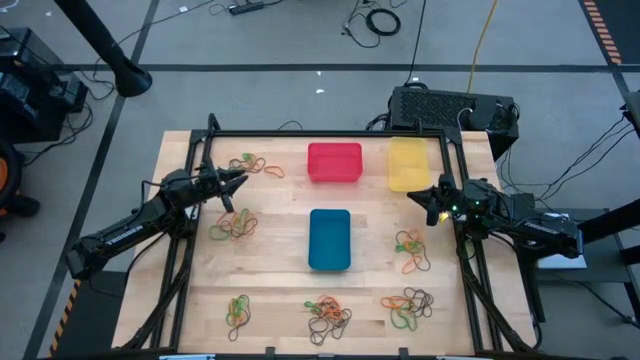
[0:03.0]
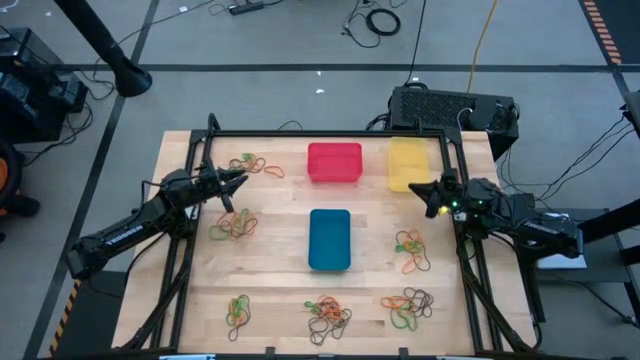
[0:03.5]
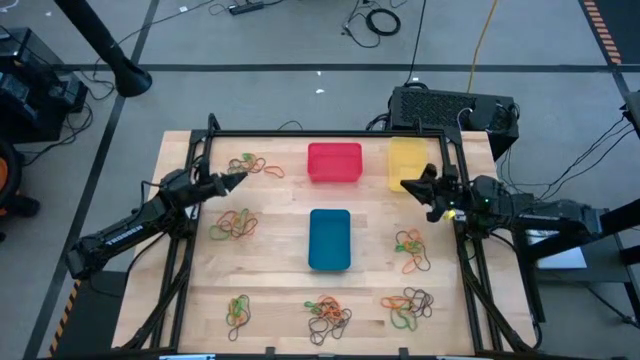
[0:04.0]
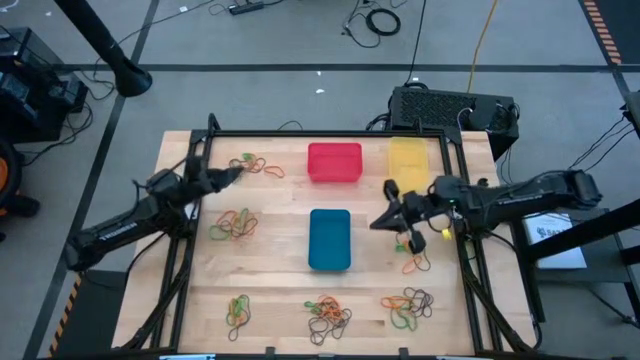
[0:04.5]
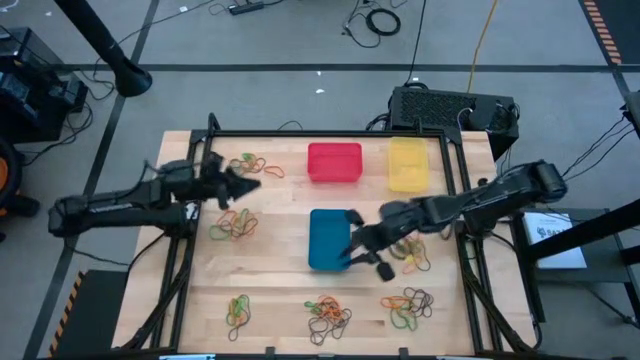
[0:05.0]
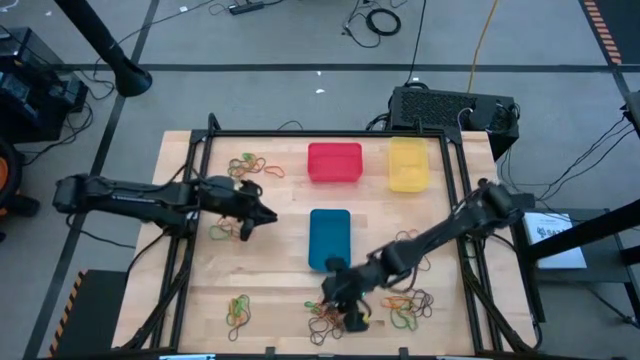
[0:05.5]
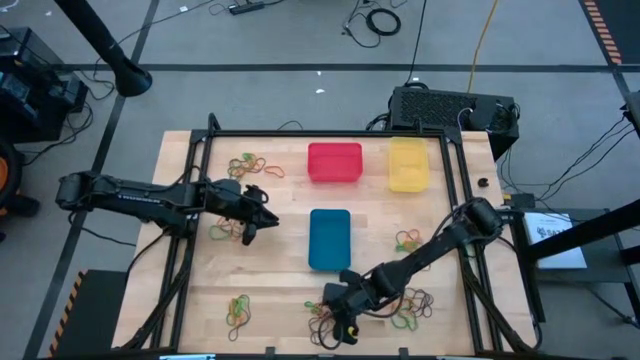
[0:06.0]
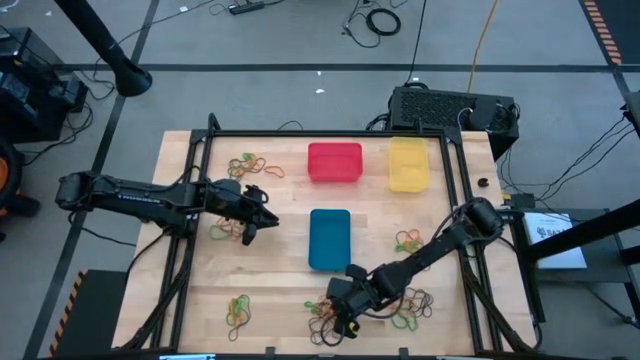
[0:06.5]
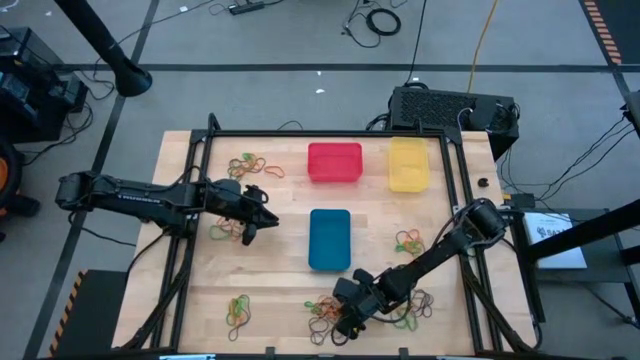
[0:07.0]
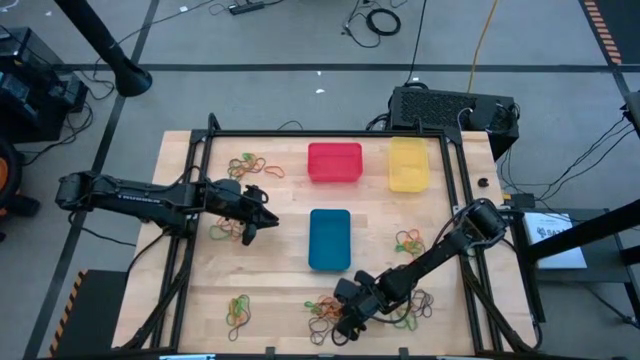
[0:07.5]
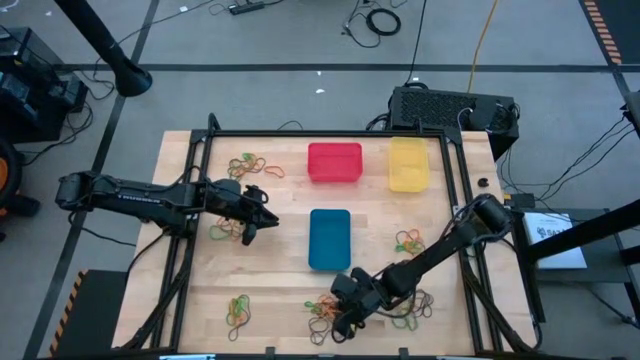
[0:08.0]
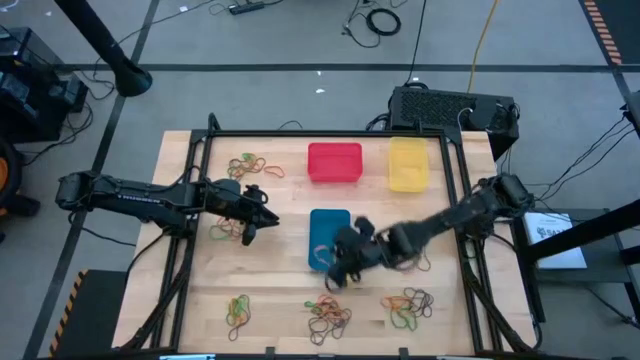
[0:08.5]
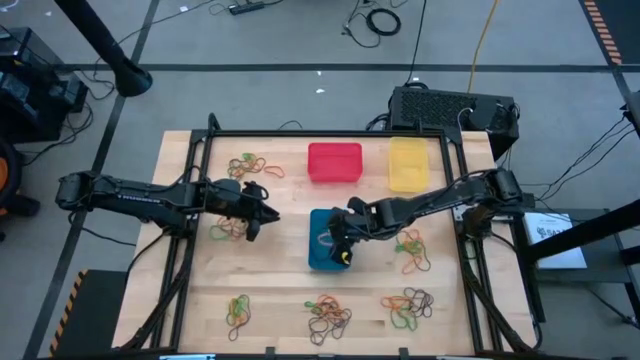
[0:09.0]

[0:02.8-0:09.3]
Task: Sort rubber bands into baskets
Put the orange rubber band into the blue bin

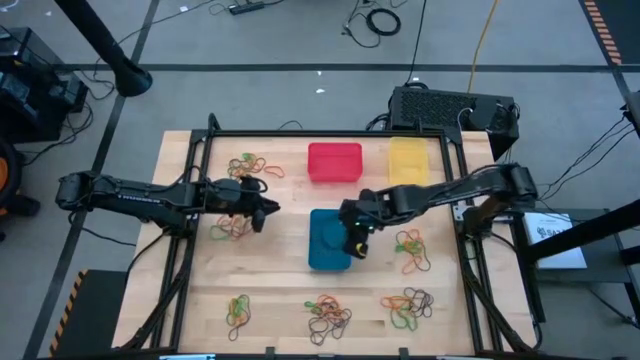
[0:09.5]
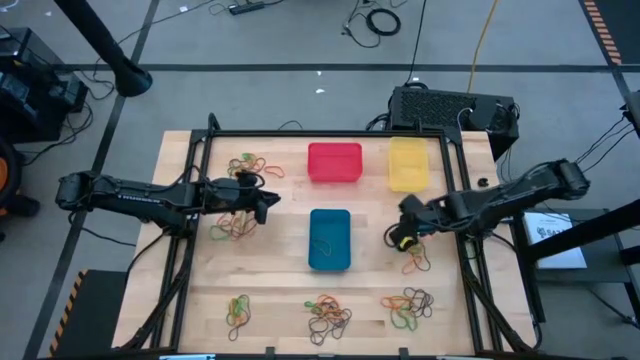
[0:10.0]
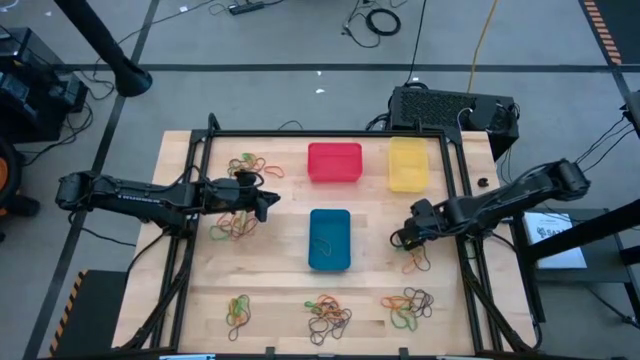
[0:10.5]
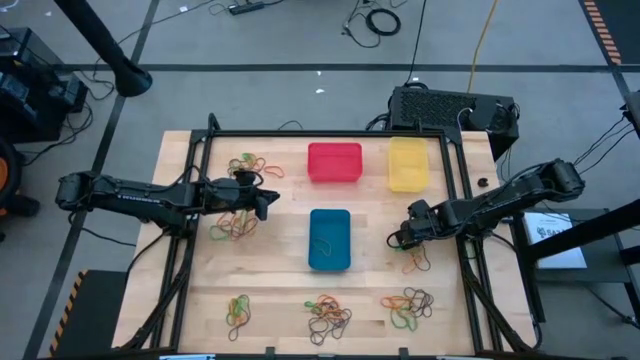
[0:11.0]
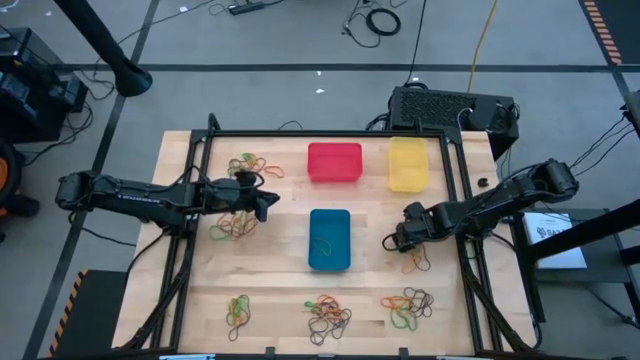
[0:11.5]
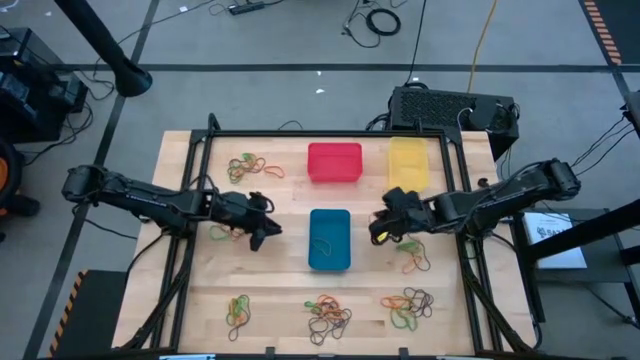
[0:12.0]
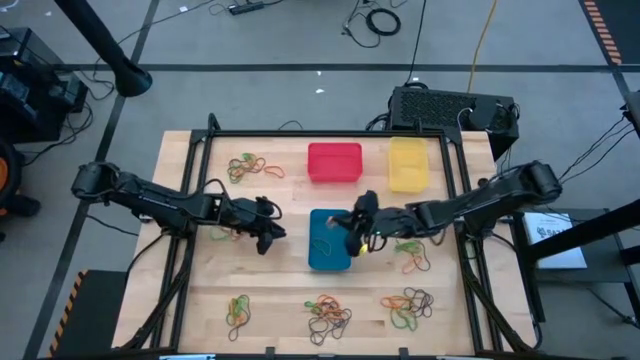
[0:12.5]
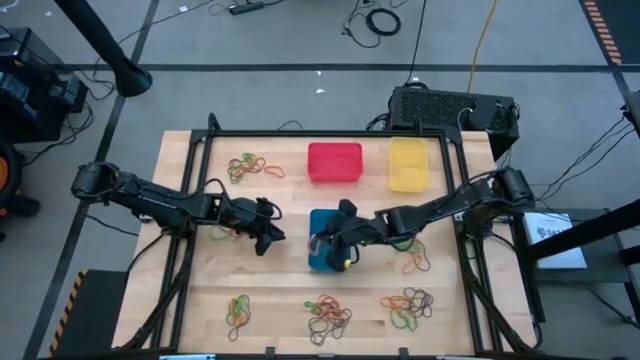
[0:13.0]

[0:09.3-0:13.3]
Put the orange rubber band into the blue bin

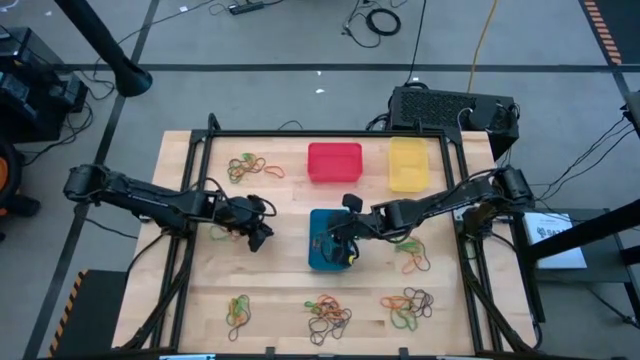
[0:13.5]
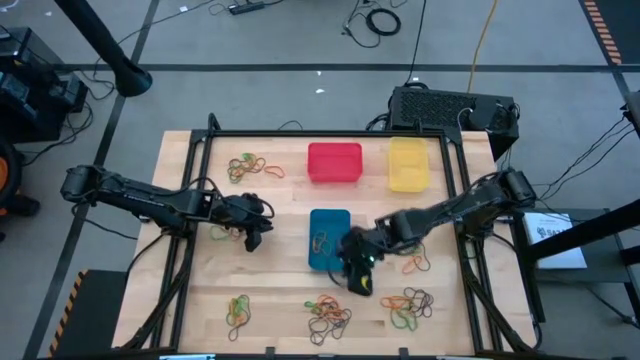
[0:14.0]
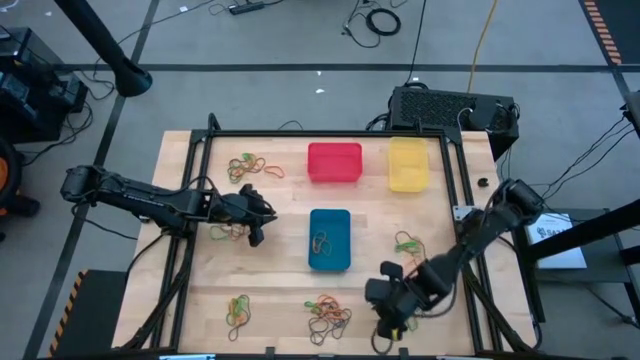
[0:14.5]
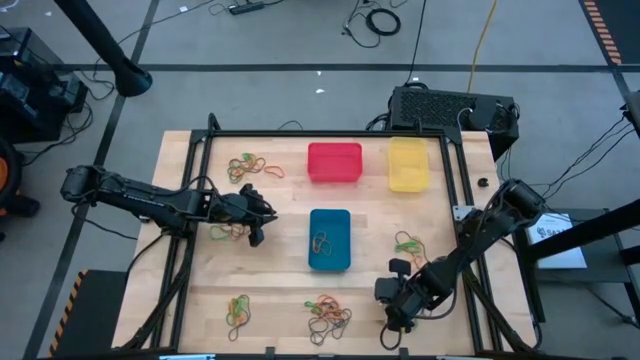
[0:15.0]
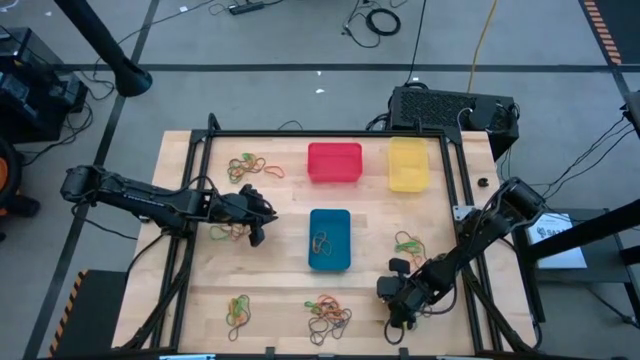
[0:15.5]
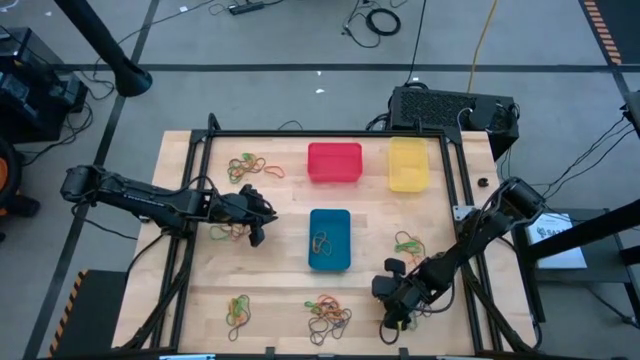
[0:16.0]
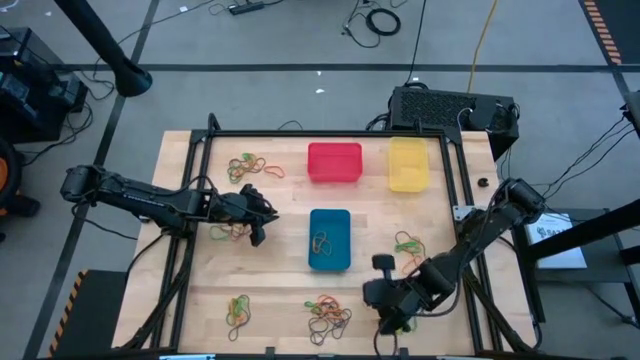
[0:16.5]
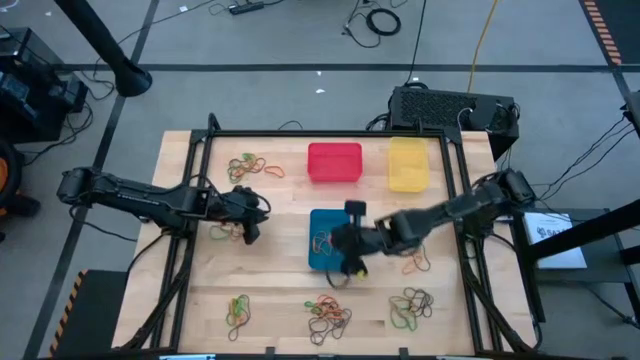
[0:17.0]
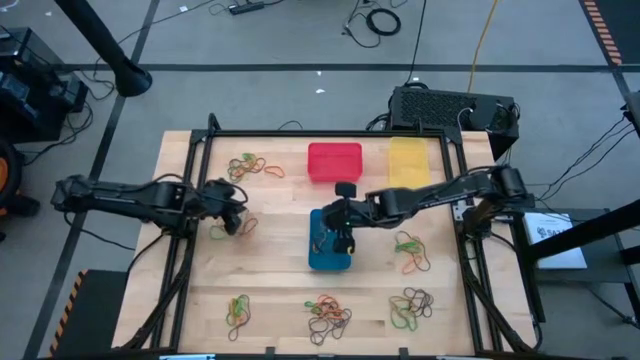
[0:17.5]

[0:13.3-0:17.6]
Put the orange rubber band into the blue bin

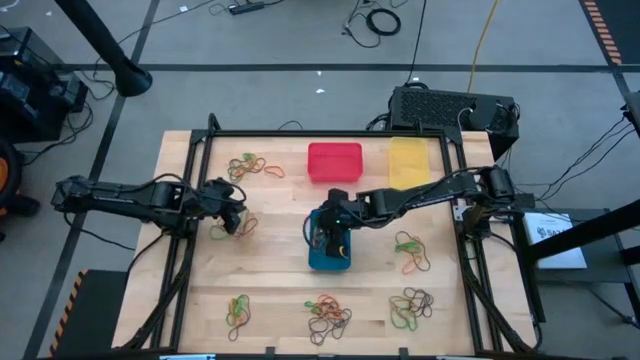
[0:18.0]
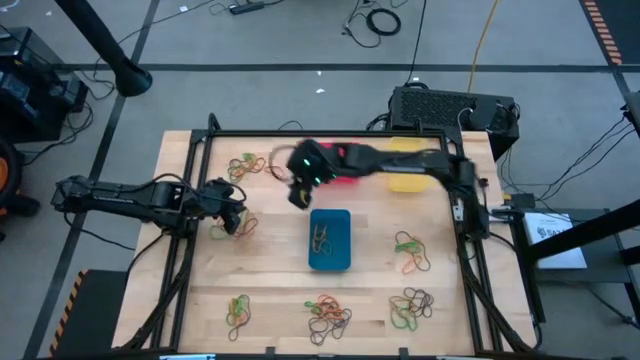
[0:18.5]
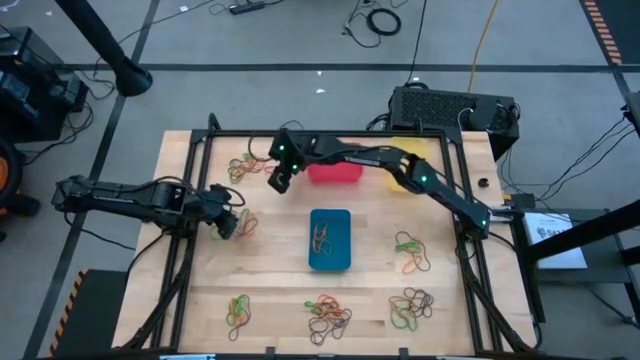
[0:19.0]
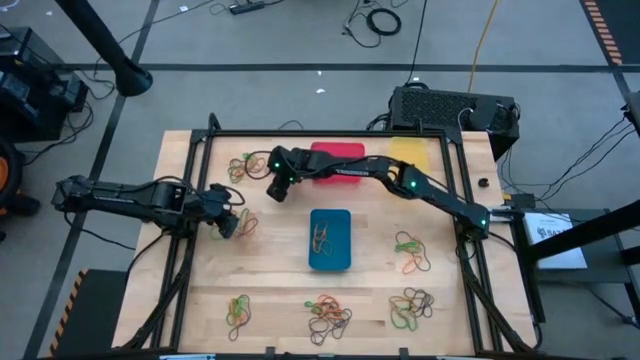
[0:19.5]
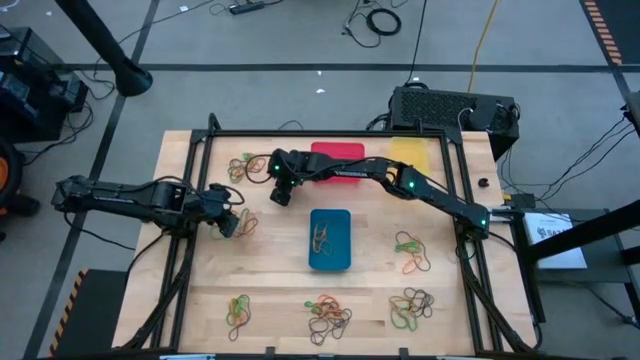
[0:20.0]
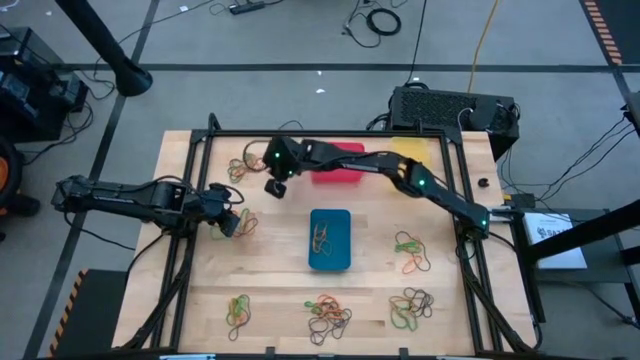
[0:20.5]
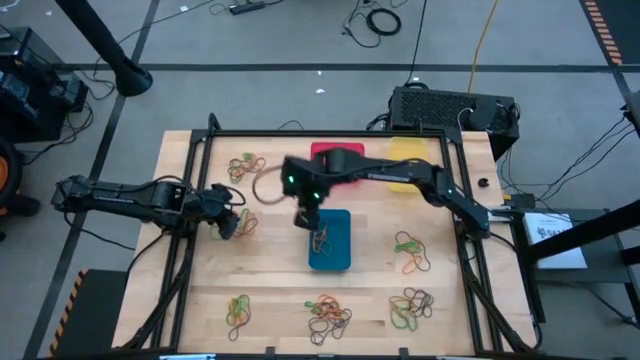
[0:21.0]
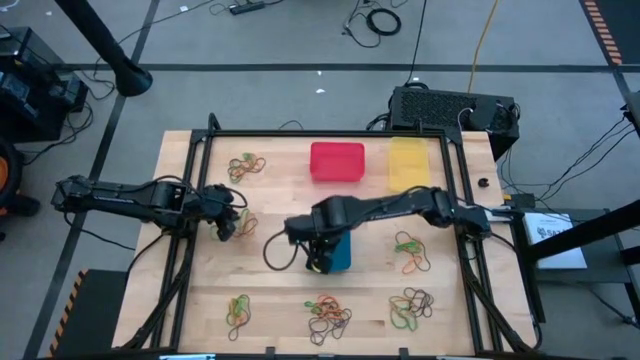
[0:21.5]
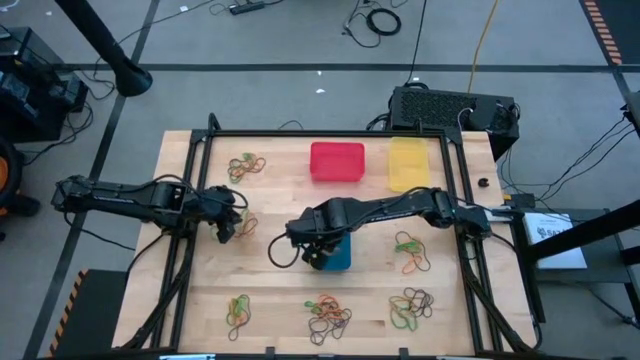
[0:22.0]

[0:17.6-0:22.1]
Put the orange rubber band into the blue bin

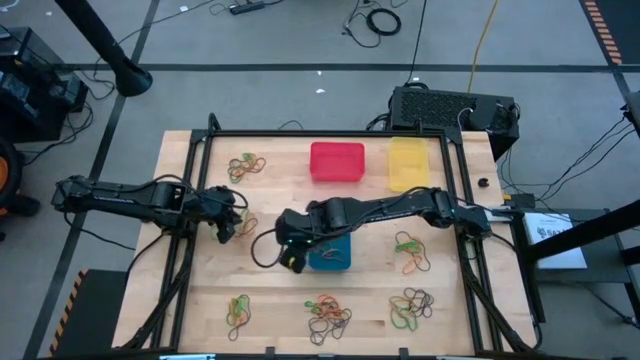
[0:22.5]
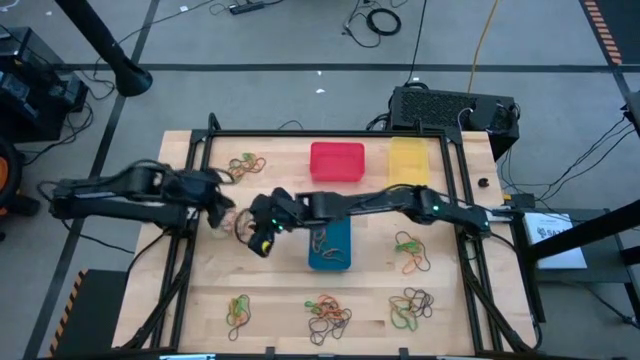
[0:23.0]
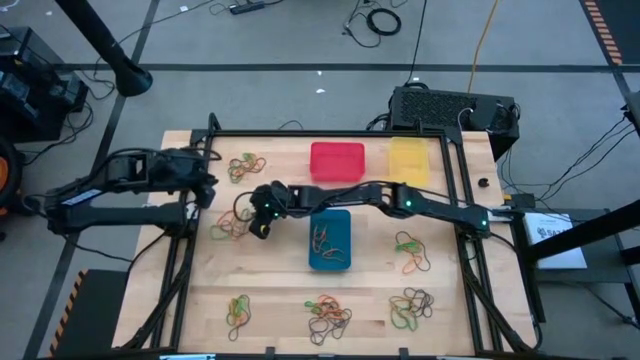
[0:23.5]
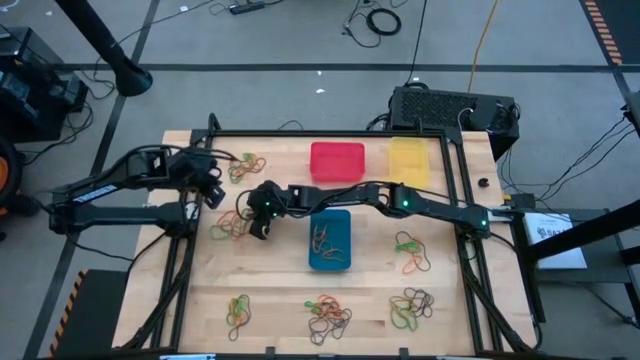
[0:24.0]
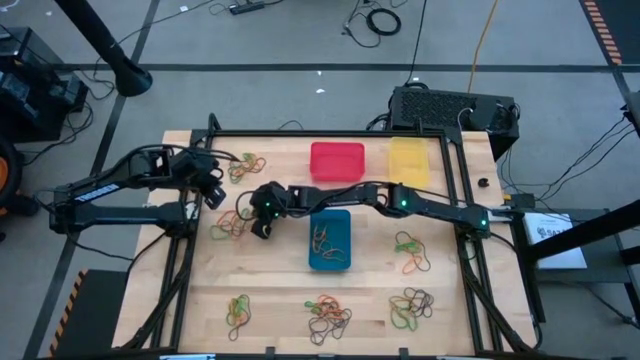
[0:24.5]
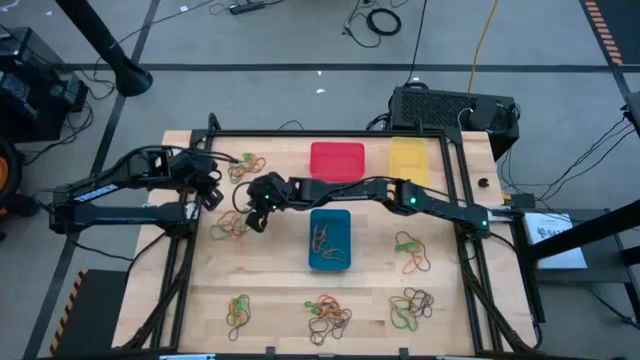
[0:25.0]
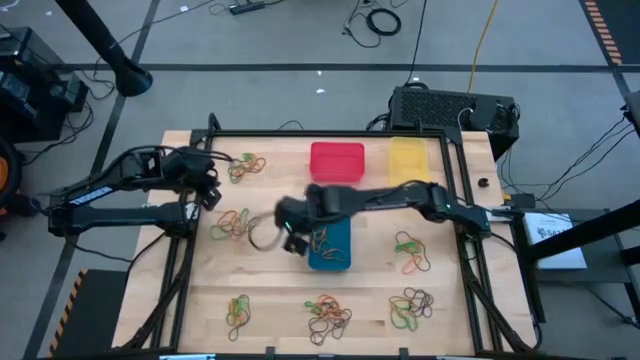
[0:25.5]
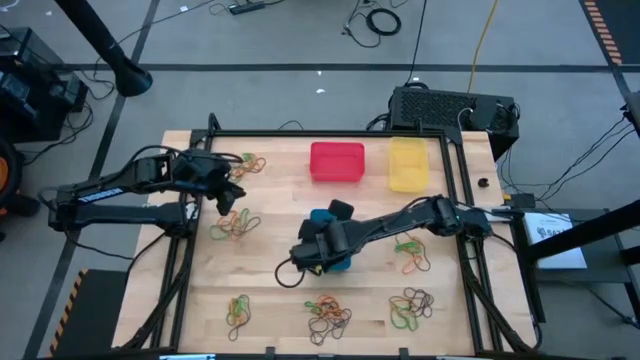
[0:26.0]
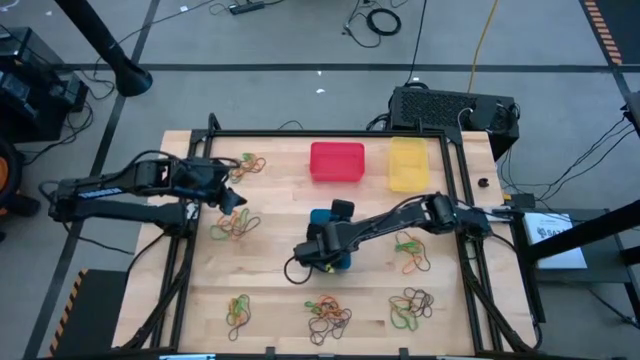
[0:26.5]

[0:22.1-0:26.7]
Put the orange rubber band into the blue bin
